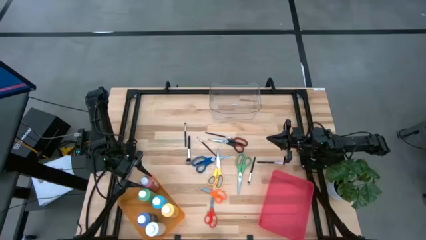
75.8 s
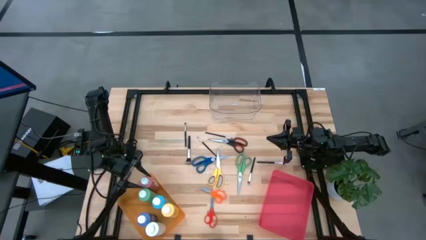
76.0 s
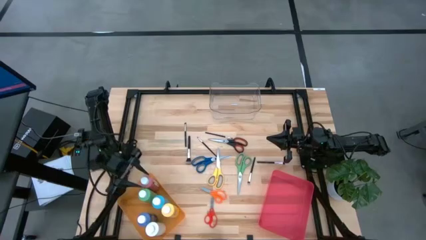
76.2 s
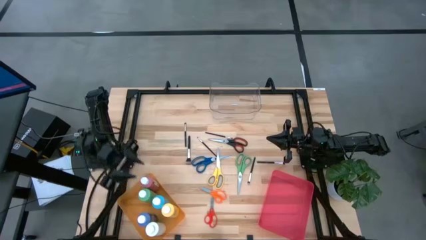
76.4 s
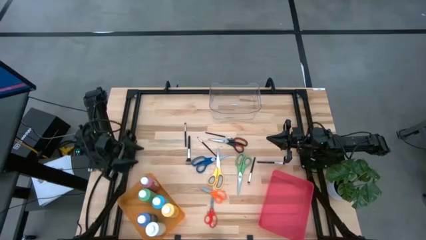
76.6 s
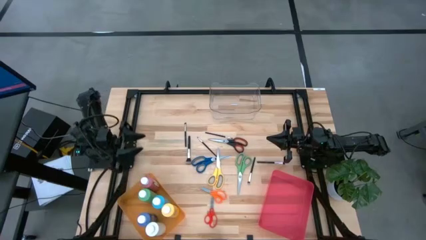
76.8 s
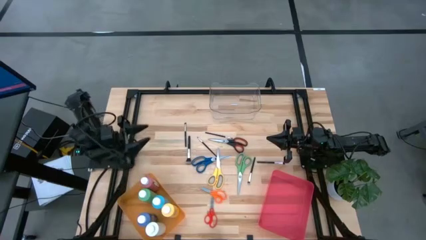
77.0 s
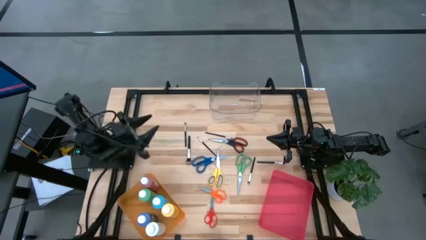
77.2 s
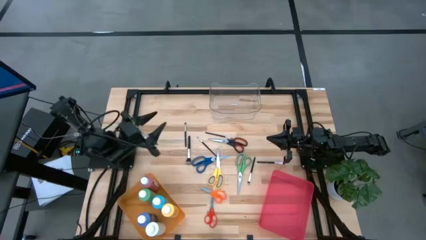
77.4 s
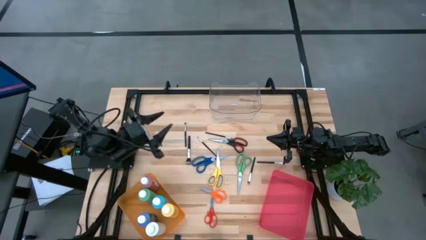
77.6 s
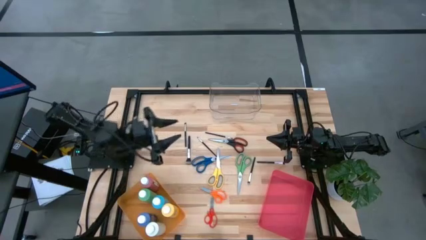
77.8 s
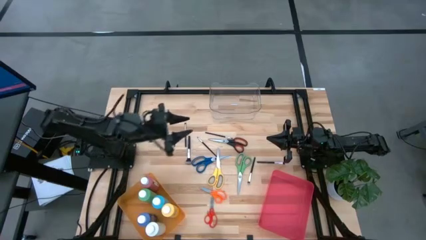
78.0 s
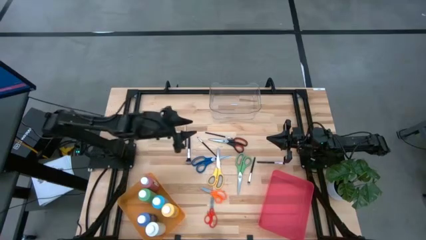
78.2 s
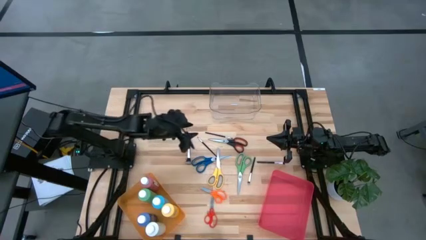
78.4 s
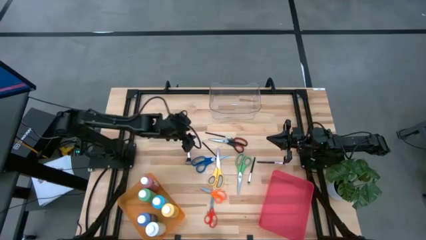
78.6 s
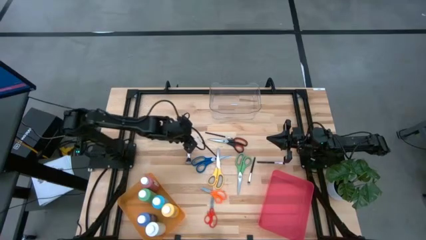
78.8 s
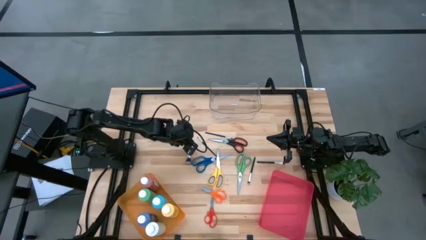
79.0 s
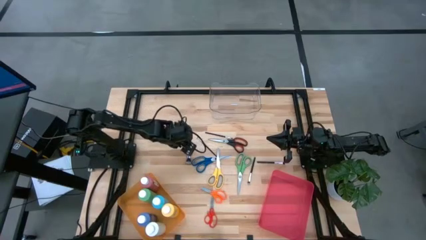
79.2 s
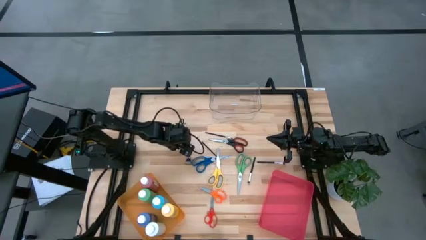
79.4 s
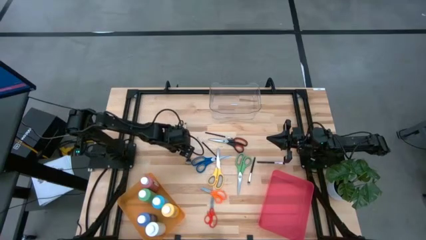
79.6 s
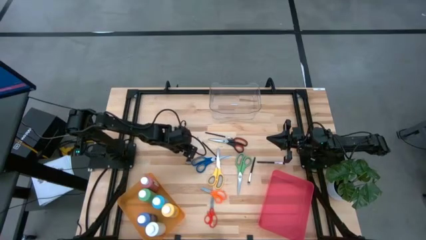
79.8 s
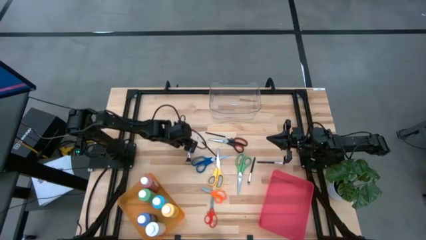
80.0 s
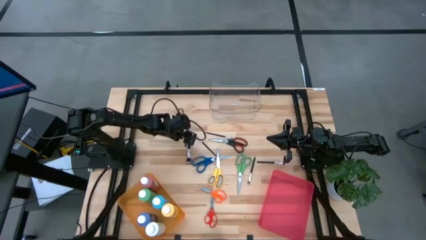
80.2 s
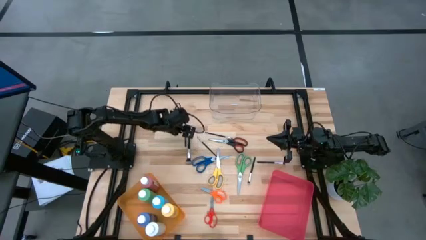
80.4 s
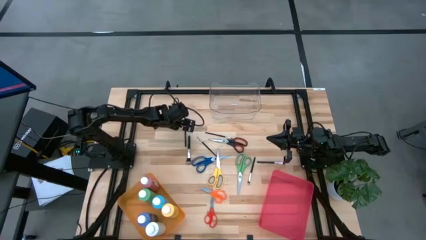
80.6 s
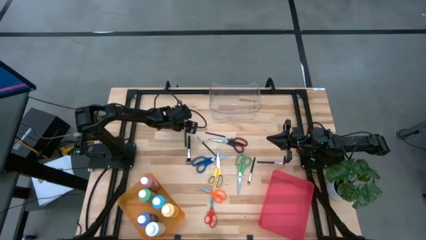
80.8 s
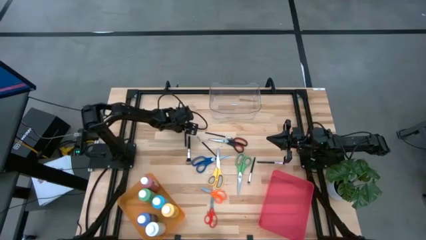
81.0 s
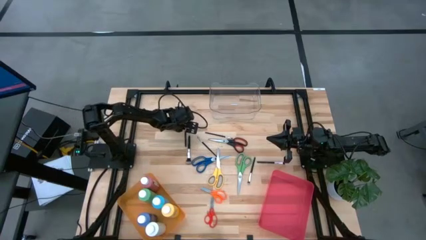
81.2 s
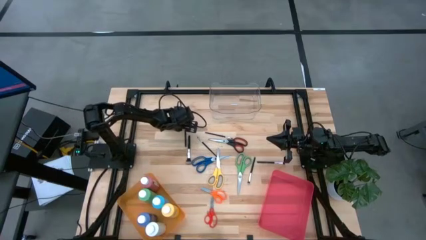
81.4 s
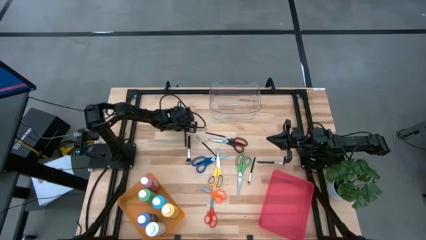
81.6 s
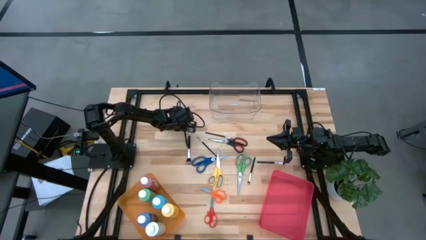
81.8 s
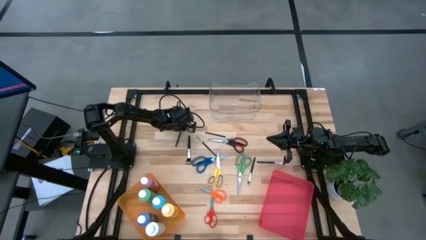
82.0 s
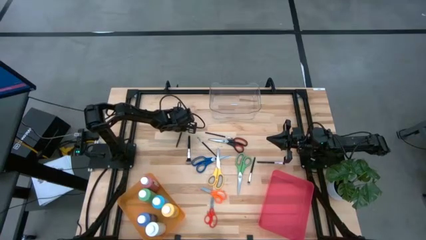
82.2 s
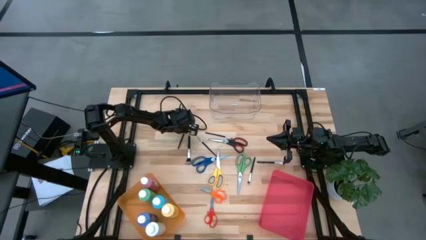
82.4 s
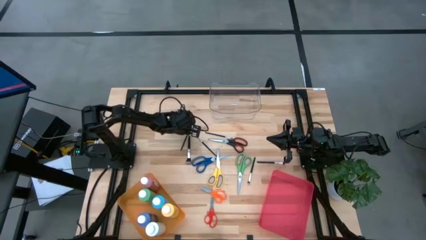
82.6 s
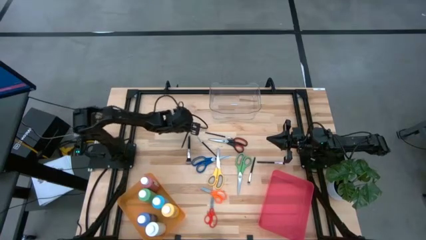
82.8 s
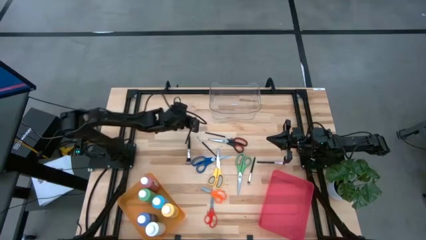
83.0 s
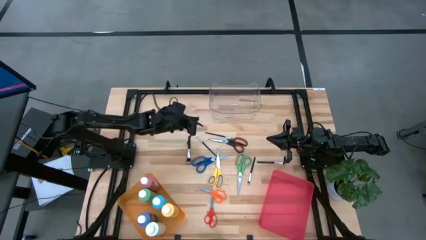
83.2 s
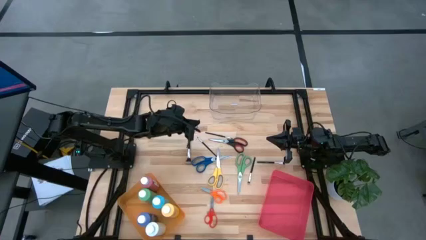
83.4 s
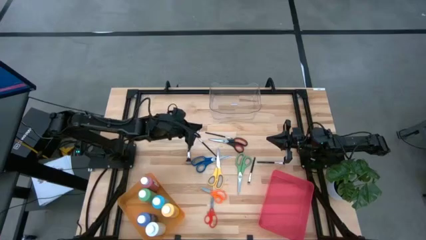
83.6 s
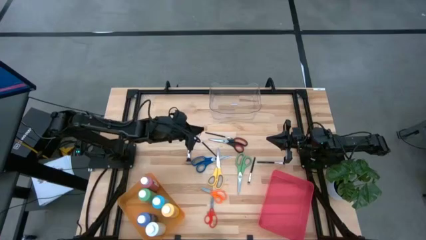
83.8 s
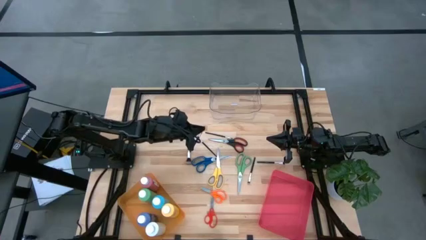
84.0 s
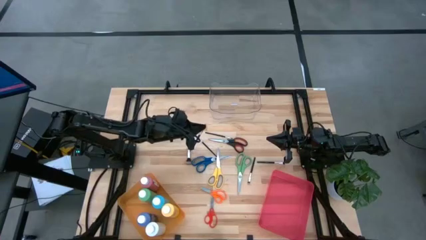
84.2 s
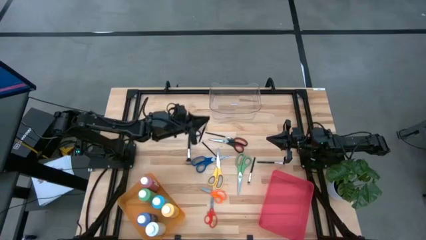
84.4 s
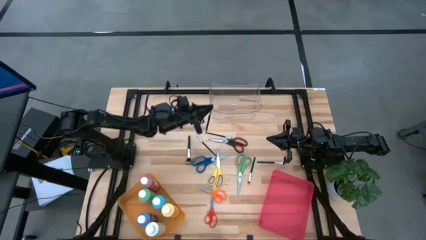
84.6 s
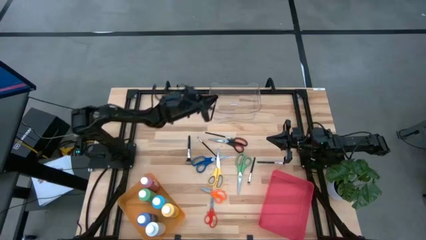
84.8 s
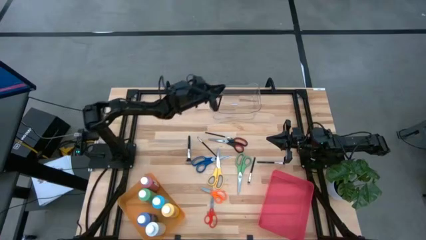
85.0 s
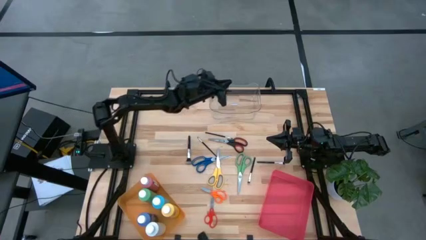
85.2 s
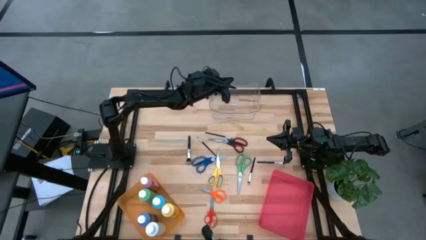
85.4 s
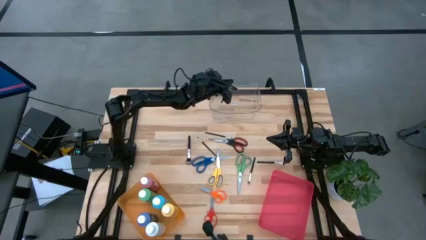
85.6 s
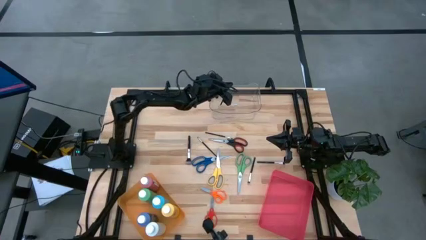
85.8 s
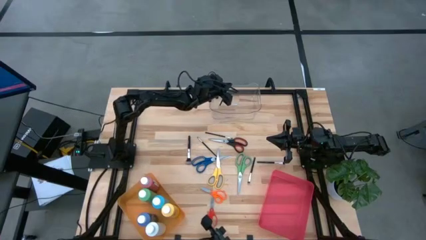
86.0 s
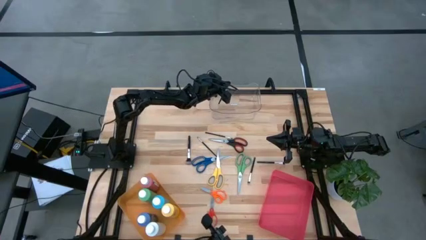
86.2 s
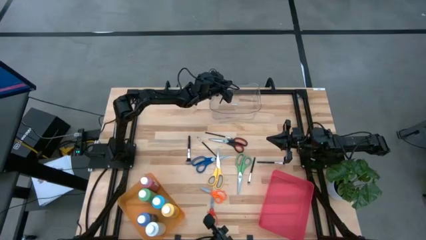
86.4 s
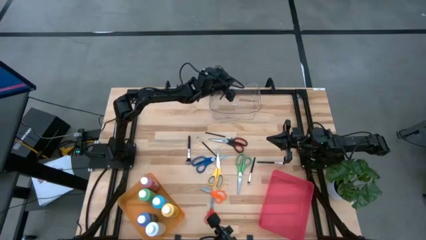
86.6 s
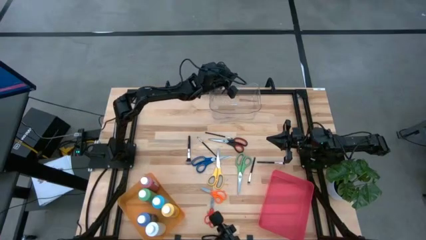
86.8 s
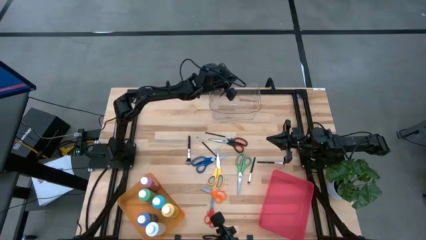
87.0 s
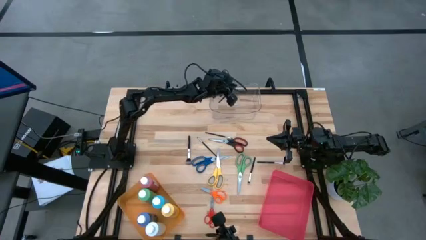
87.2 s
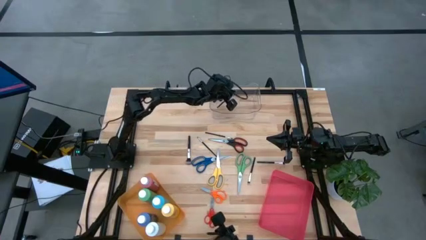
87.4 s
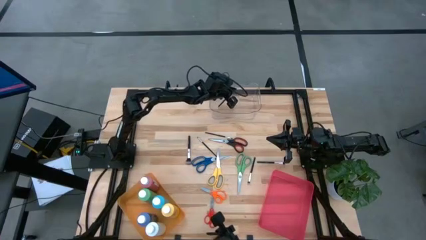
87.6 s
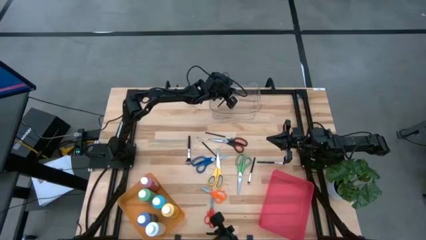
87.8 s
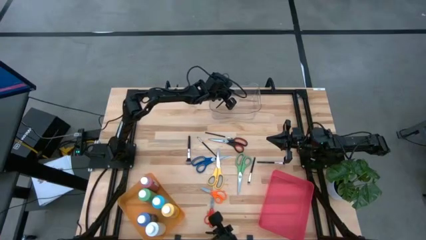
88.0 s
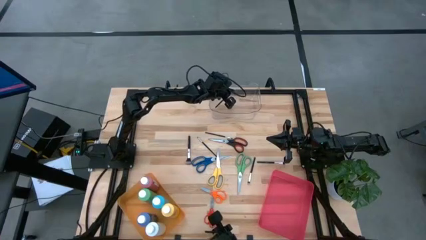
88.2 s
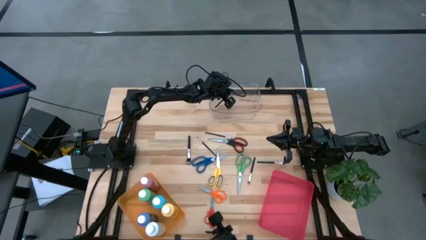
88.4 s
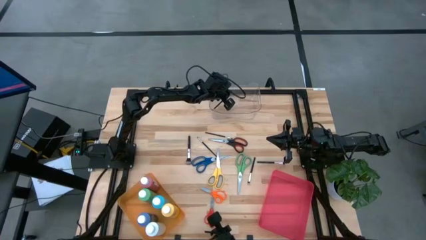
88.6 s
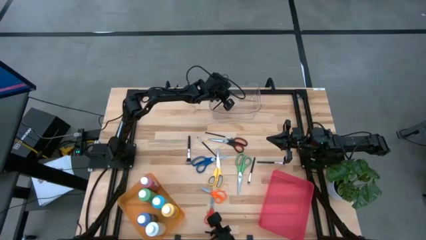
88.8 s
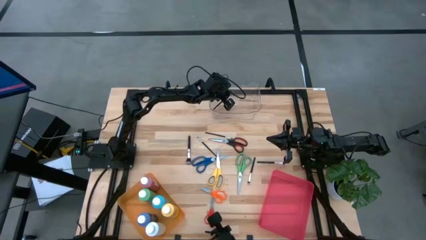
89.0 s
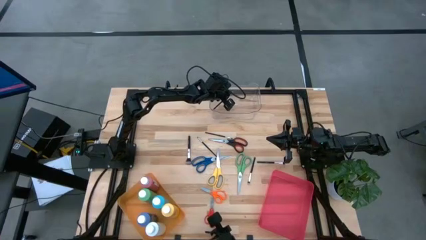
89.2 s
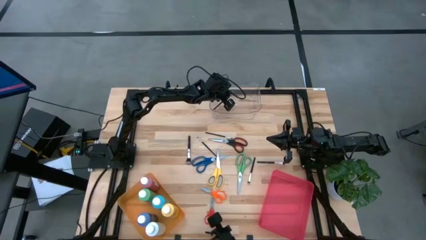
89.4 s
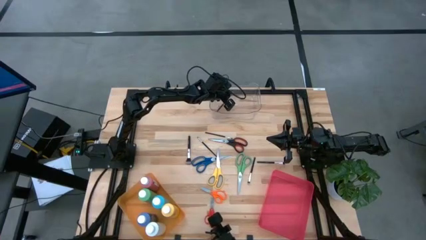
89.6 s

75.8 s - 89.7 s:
Task: Pick & Place Paint Supplies
Put the eyeshadow brush into the transparent bin

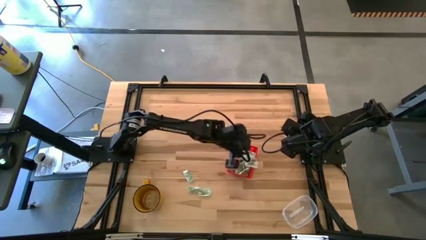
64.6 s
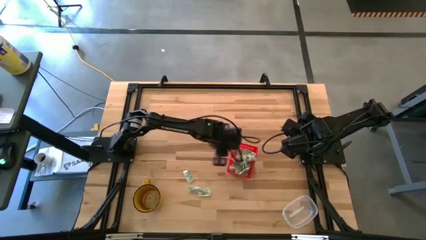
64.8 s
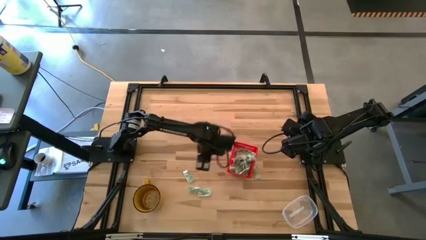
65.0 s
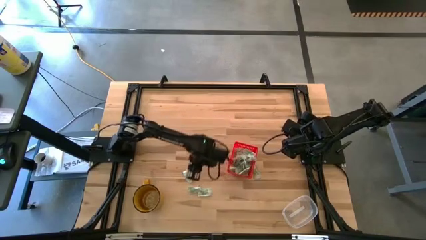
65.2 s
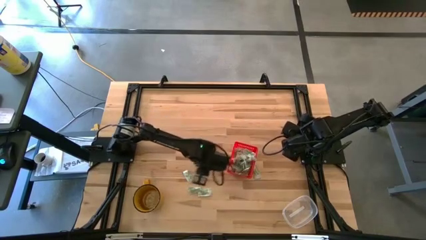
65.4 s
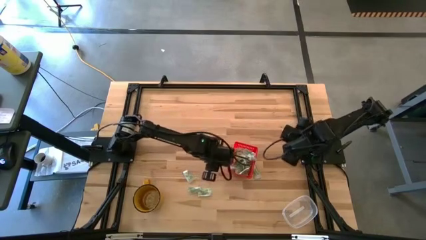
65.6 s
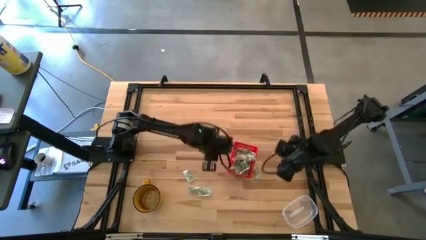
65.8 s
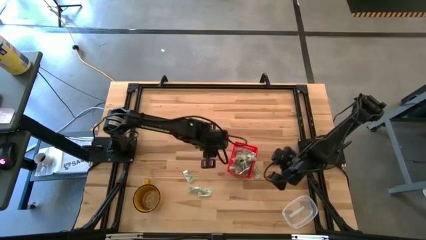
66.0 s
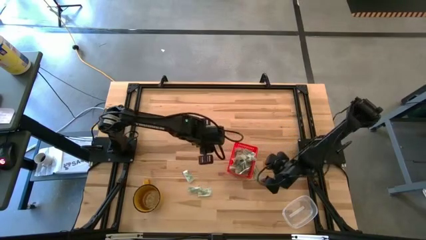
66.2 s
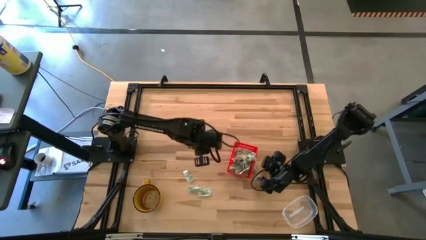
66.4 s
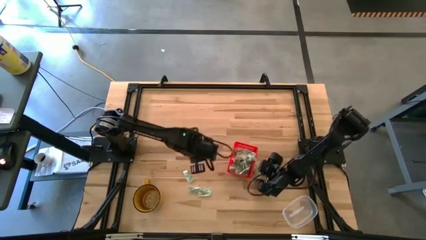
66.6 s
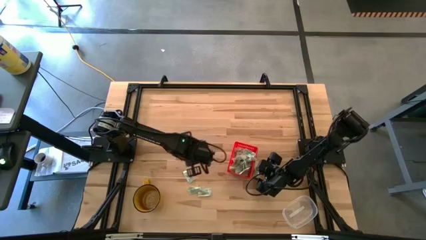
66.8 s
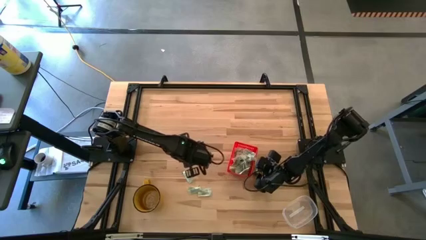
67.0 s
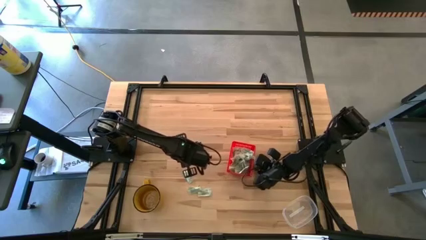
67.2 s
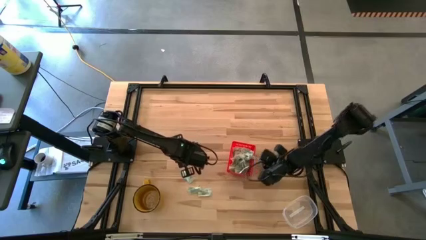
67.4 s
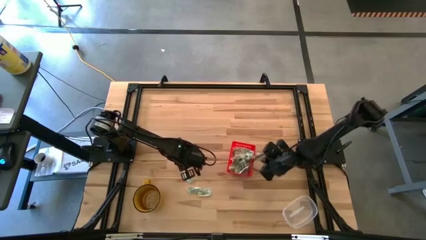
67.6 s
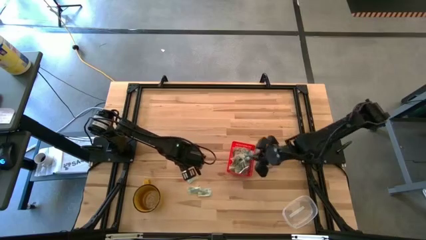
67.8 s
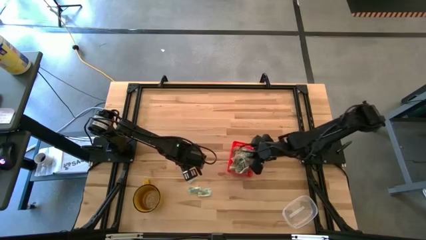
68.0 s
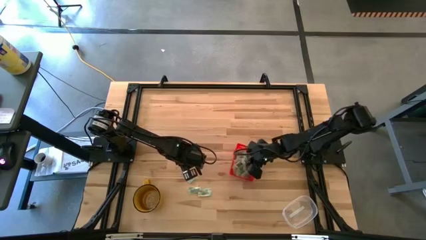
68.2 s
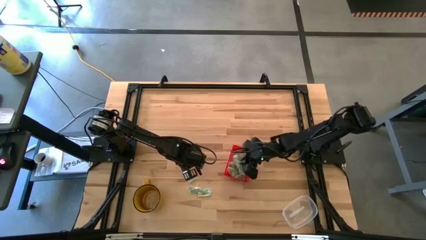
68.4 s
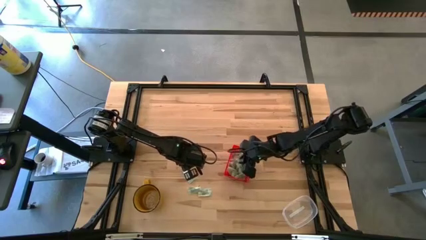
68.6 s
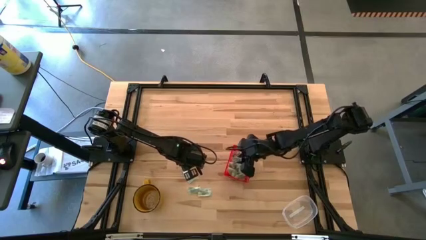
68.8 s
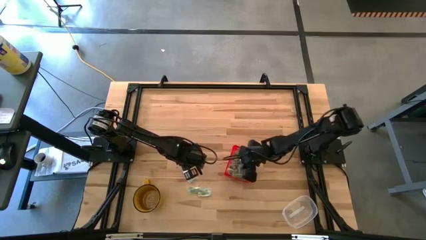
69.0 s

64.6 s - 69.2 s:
Task: Pick and place items into bin
Put the light green stevia packet into the red bin
